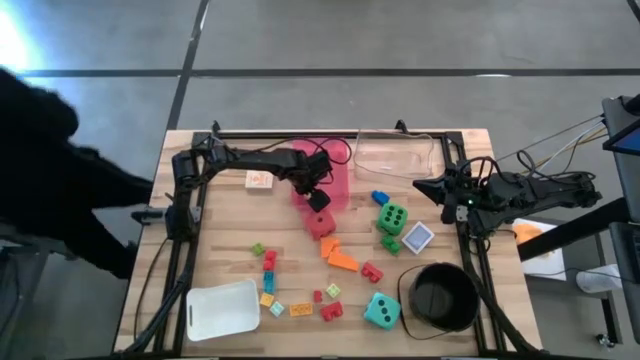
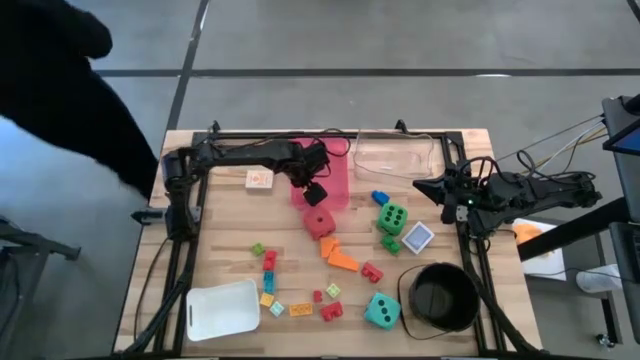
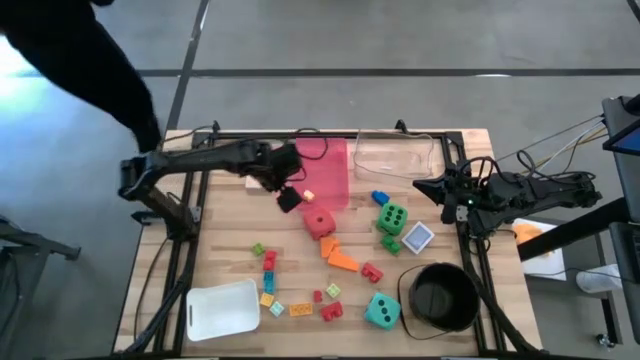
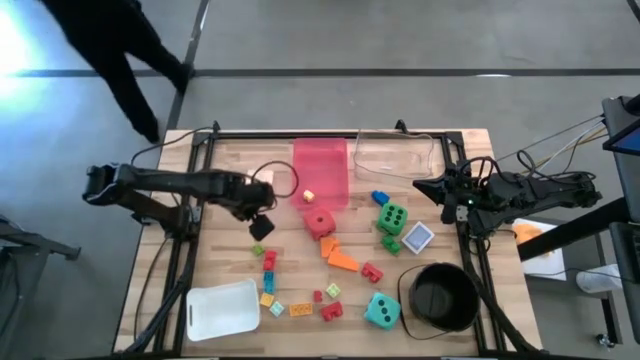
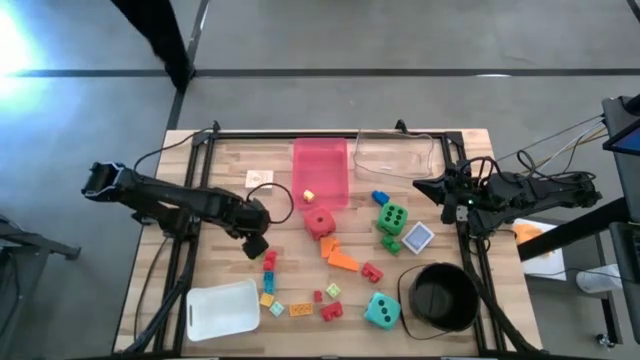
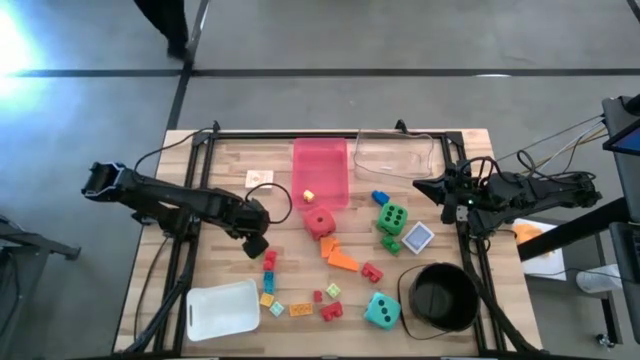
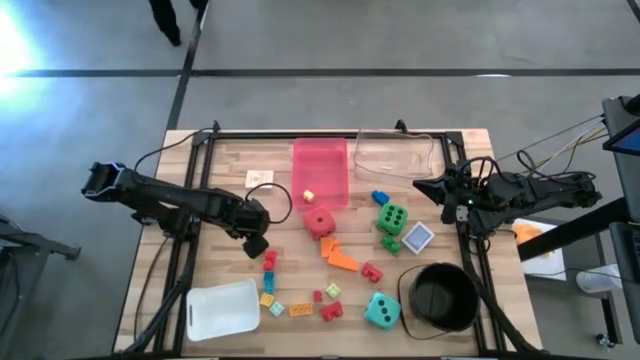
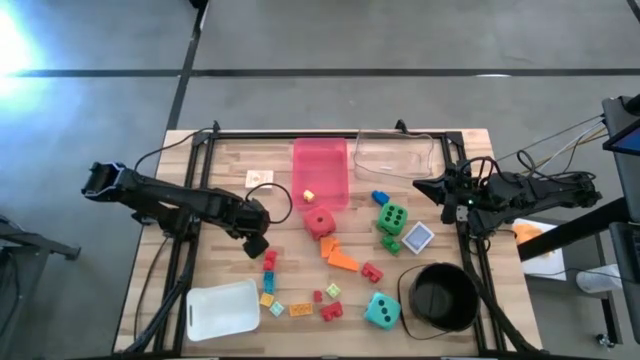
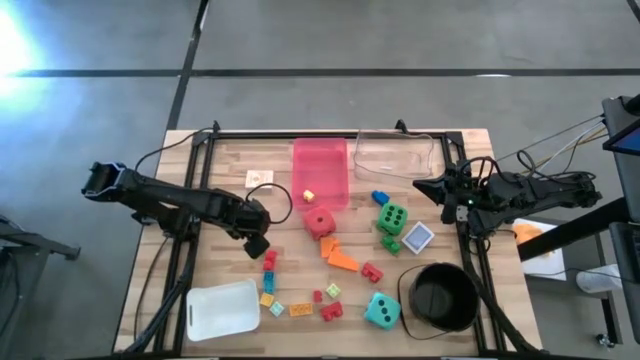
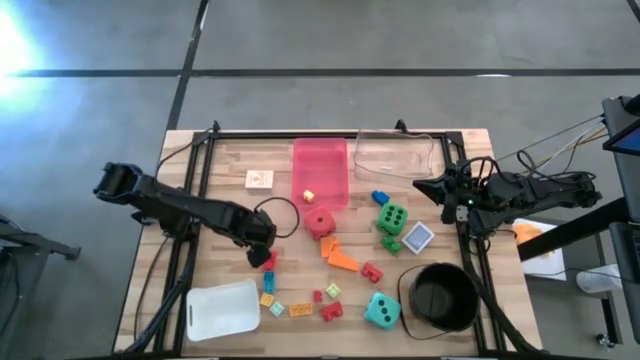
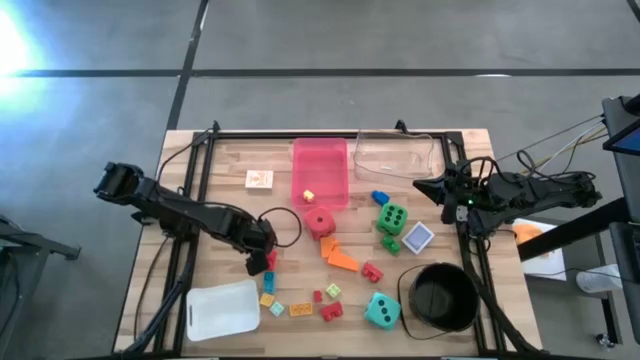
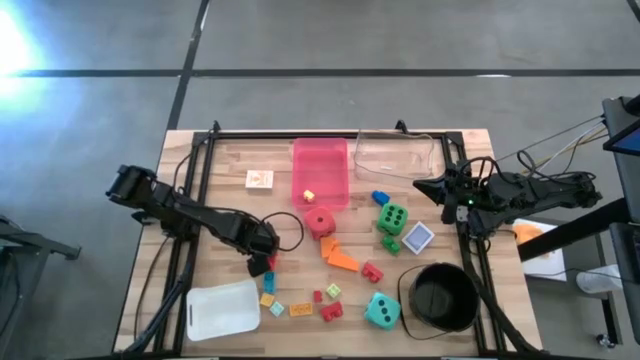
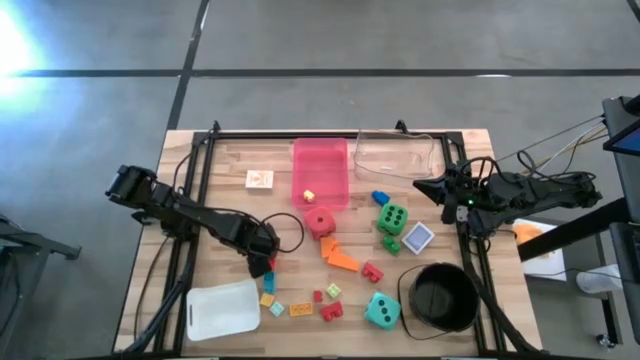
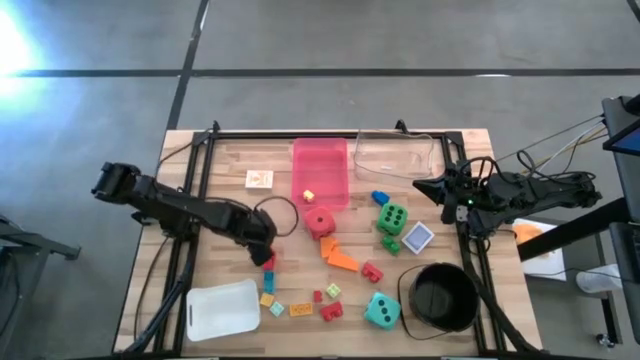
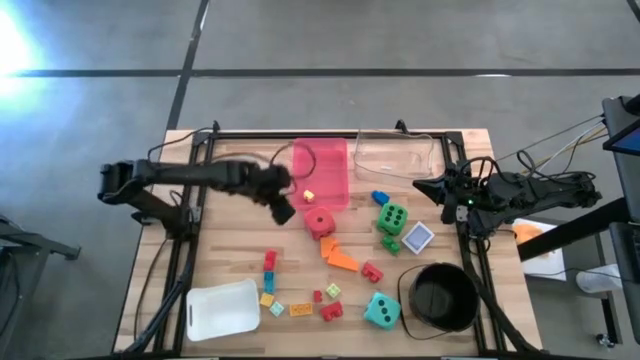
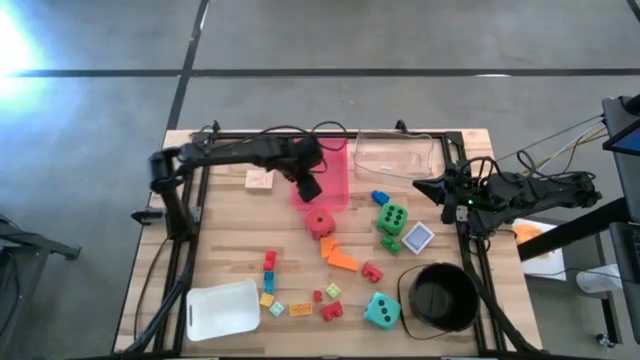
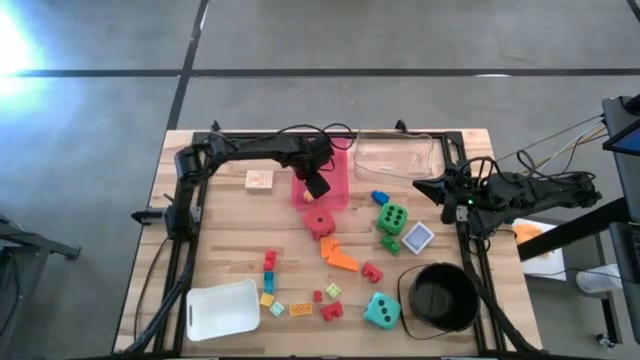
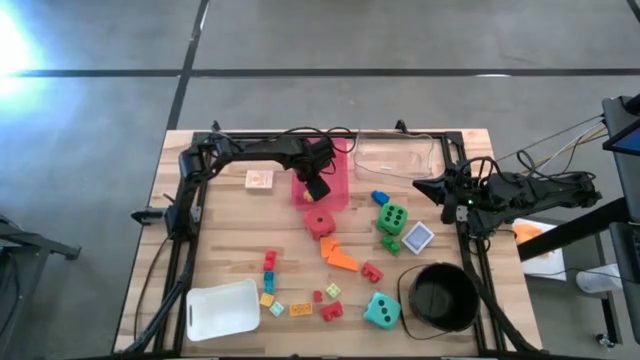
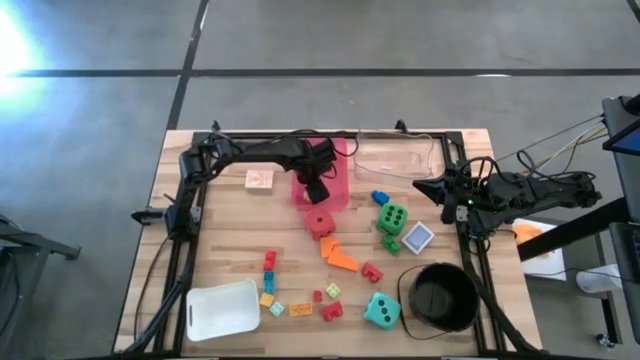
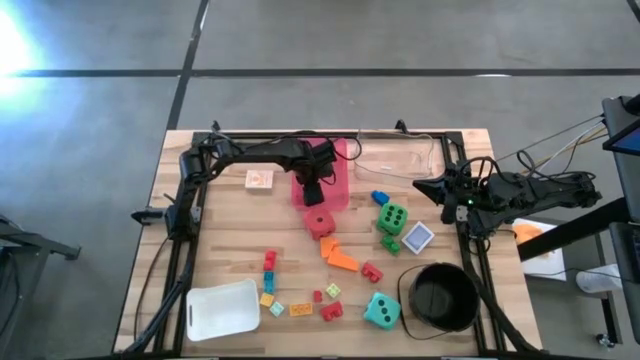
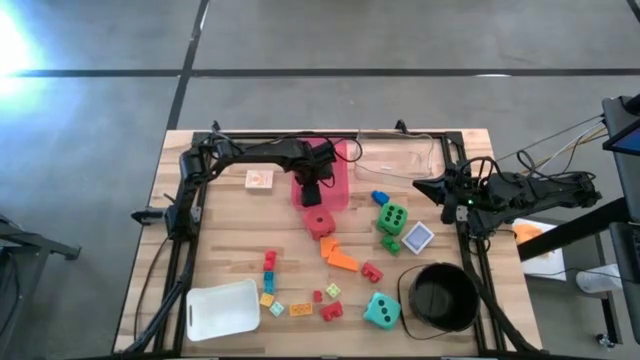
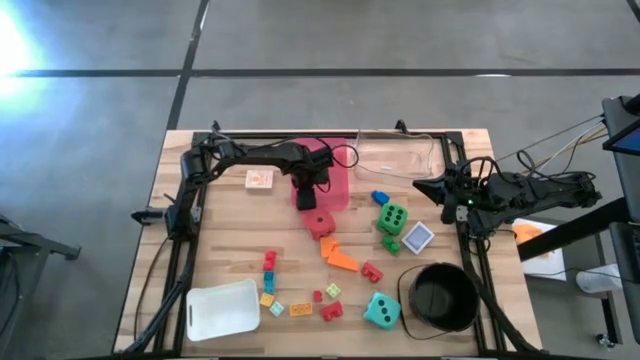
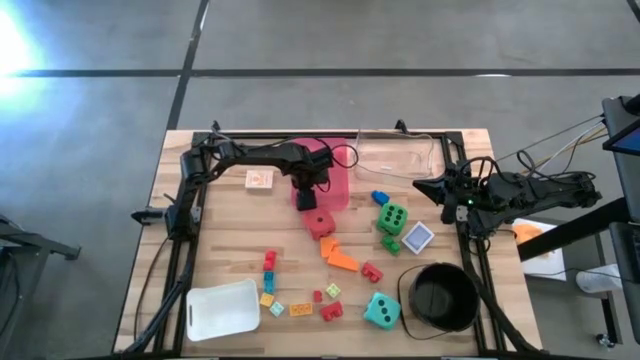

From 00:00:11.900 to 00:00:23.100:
Task: Pick & Place Toys
Put the light green game piece into the red bin

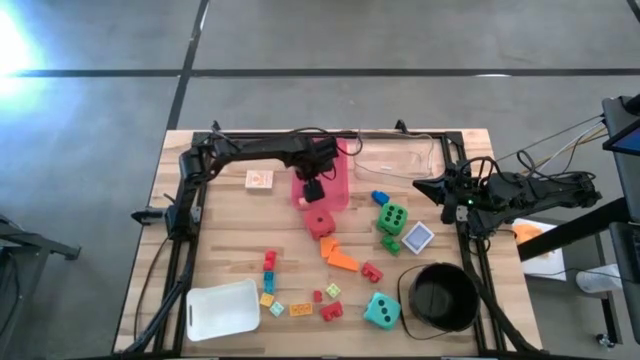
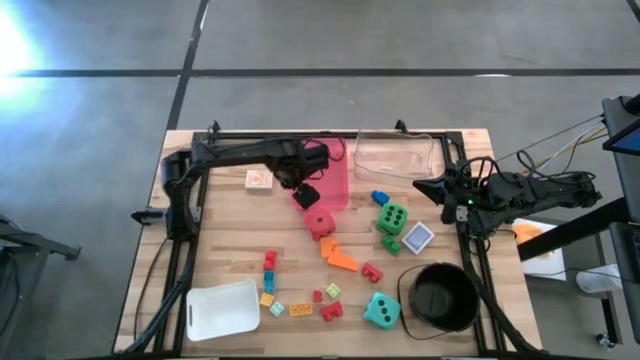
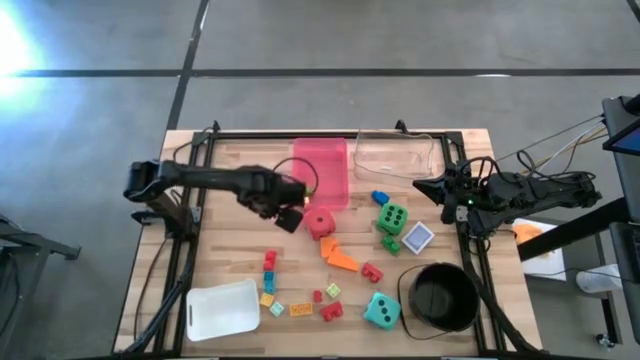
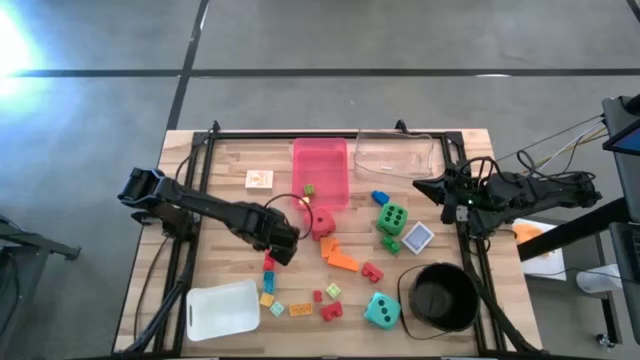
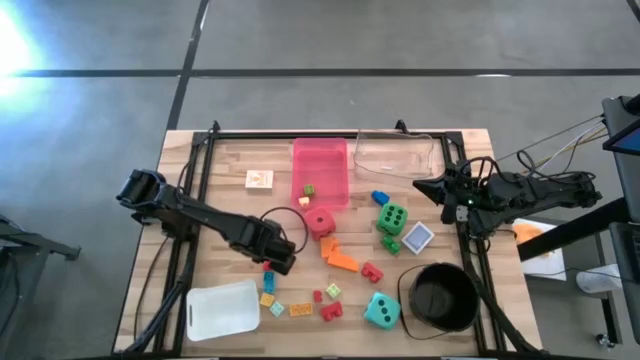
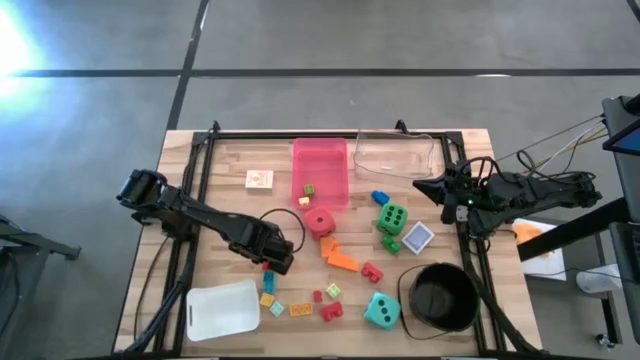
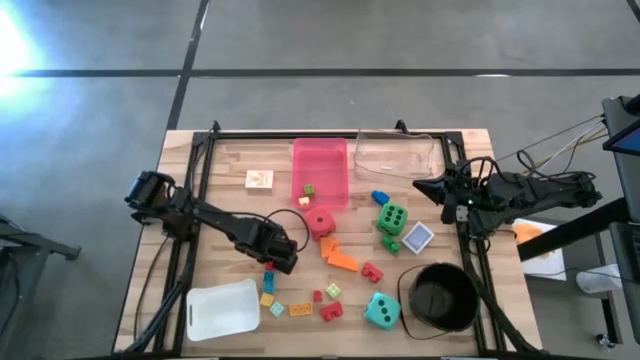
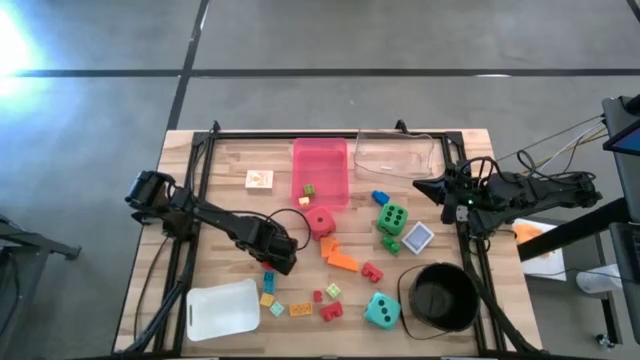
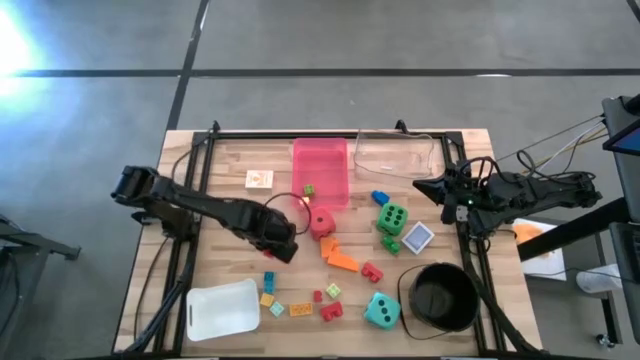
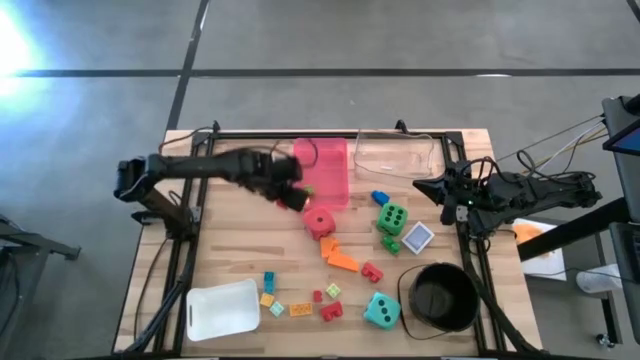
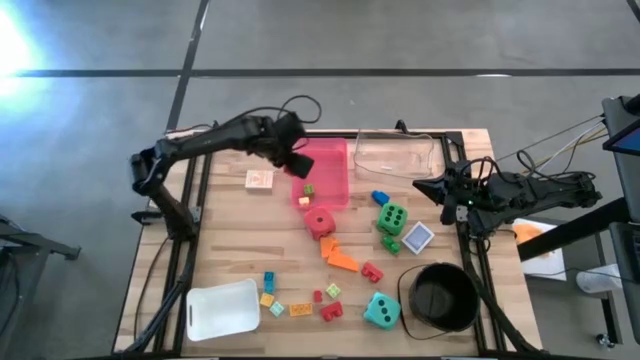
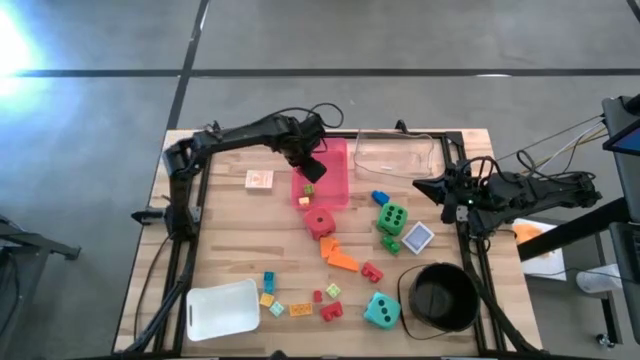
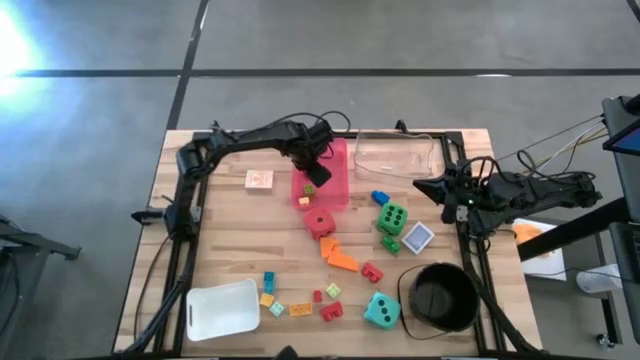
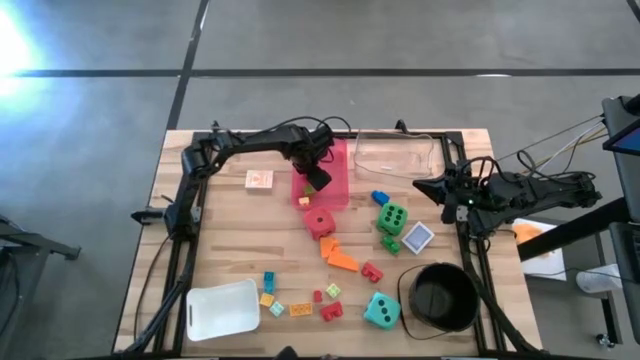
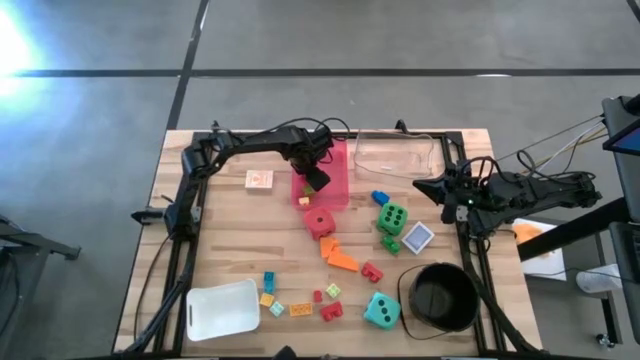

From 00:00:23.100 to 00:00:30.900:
Put the red game piece into the red bin

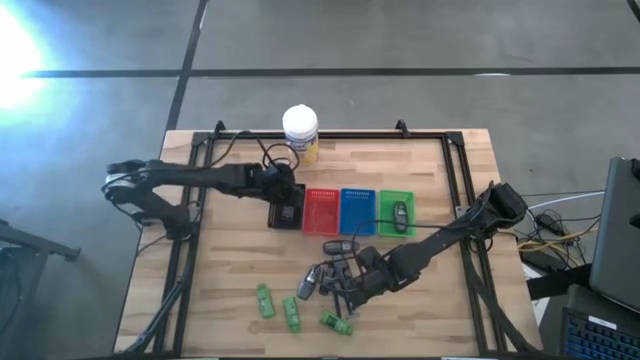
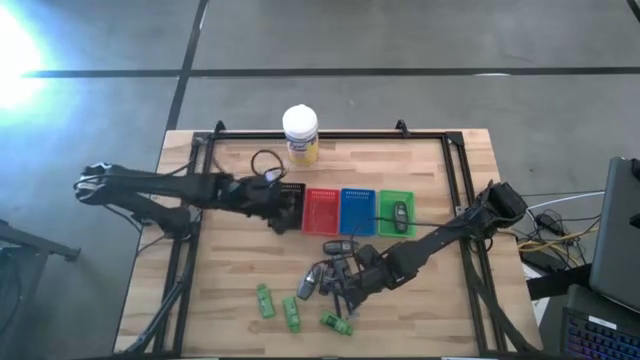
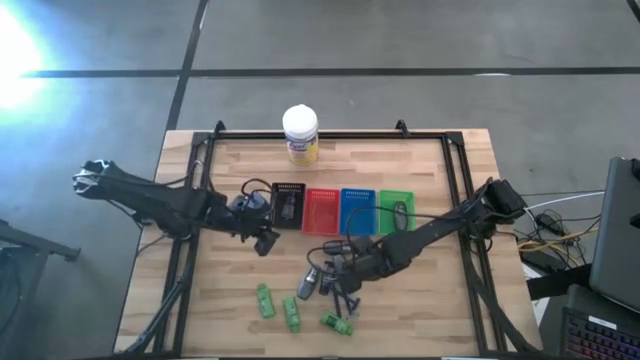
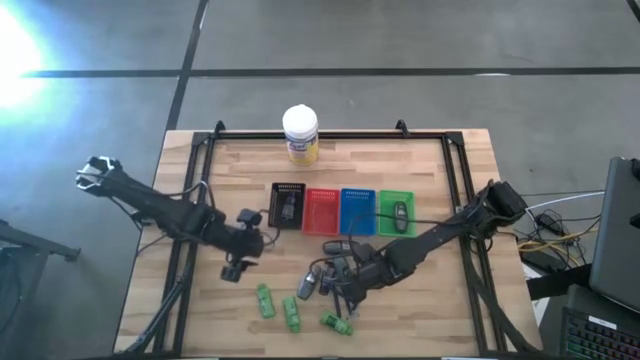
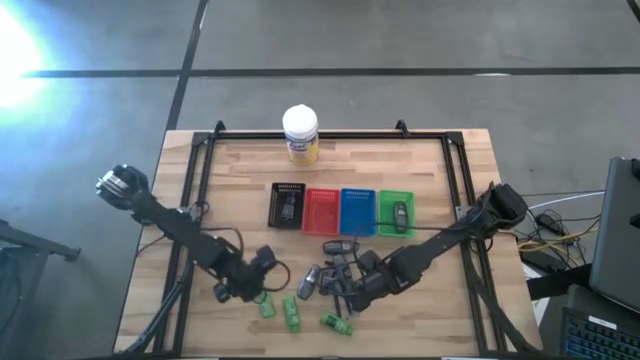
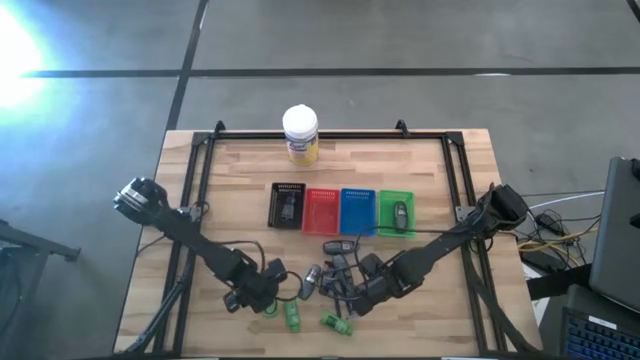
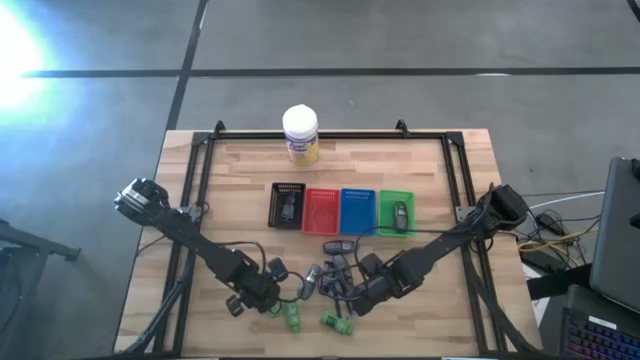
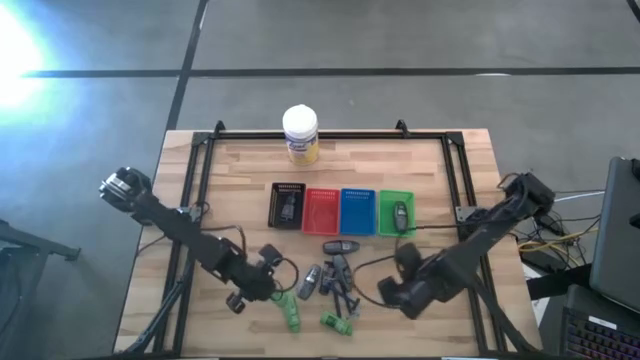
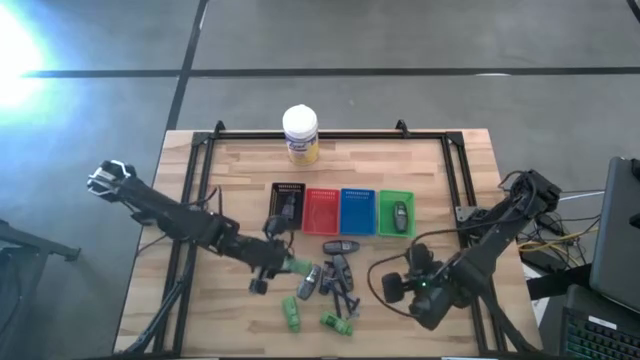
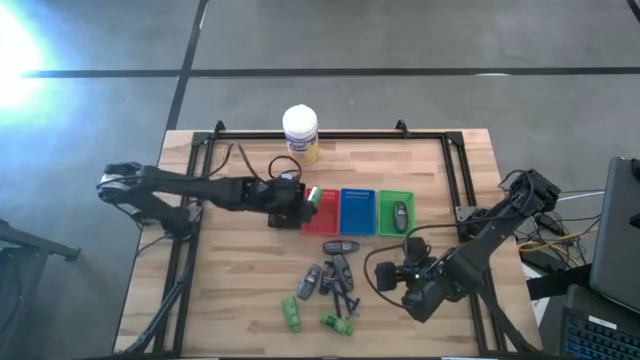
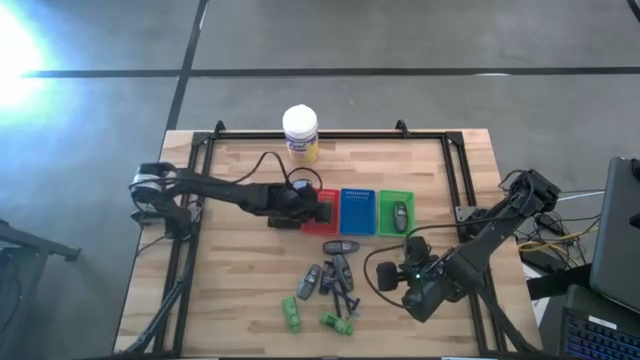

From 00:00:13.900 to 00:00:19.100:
Task: Pick & Place Travel size toiletries
Put the green shampoo bottle into the red basket
